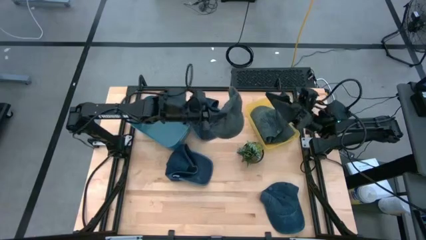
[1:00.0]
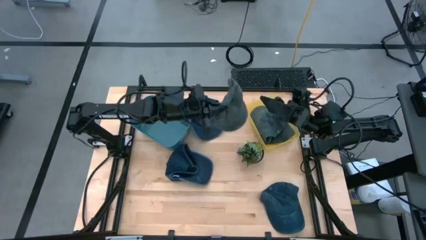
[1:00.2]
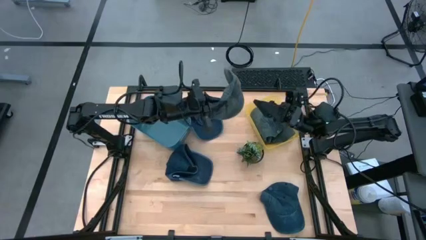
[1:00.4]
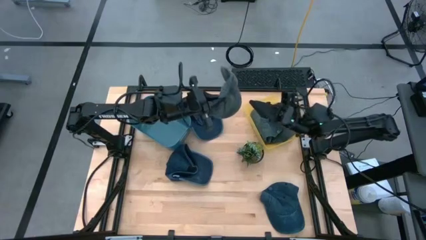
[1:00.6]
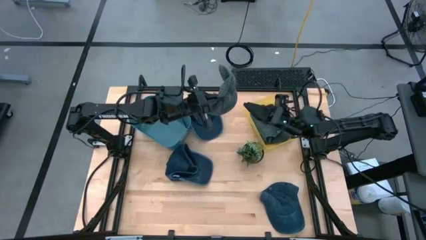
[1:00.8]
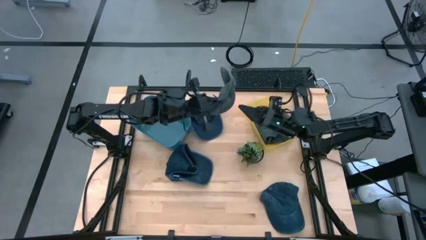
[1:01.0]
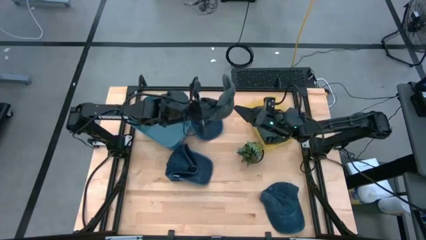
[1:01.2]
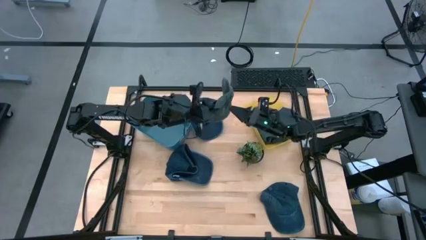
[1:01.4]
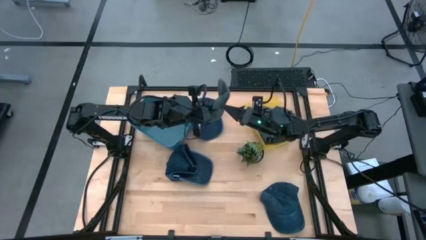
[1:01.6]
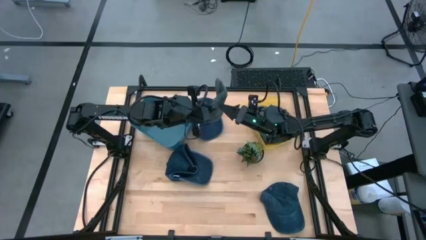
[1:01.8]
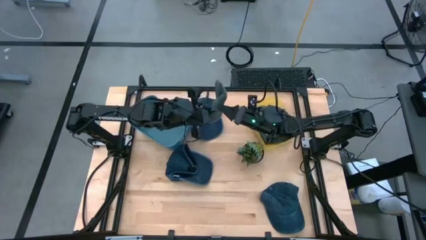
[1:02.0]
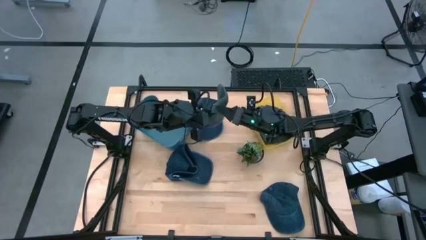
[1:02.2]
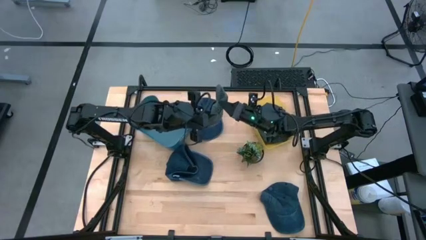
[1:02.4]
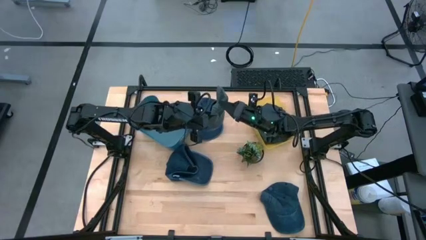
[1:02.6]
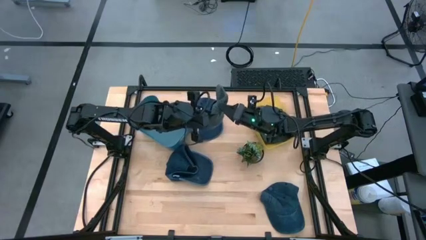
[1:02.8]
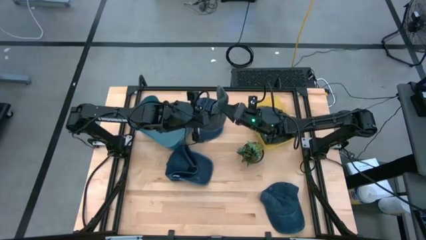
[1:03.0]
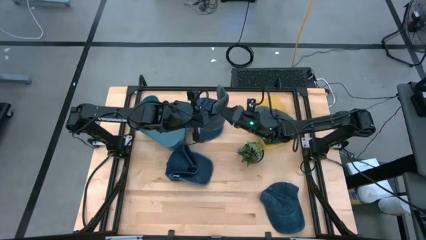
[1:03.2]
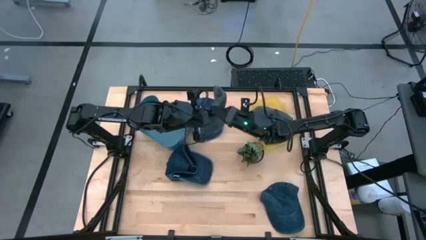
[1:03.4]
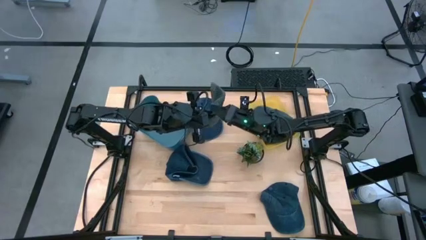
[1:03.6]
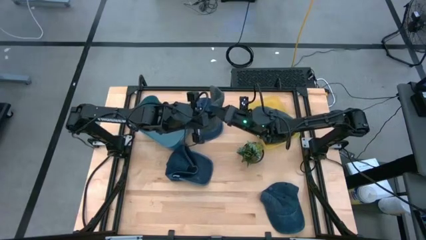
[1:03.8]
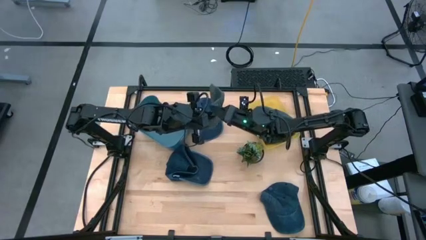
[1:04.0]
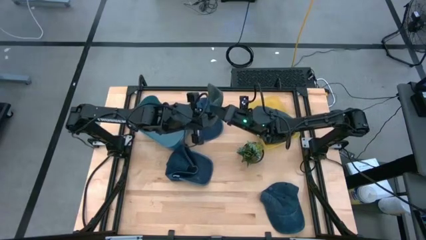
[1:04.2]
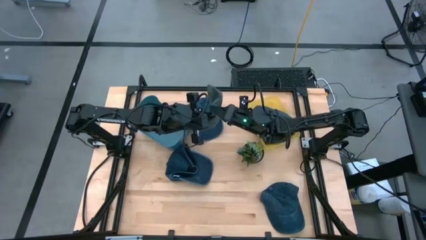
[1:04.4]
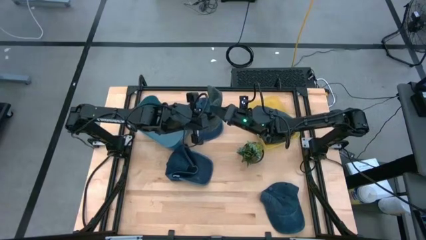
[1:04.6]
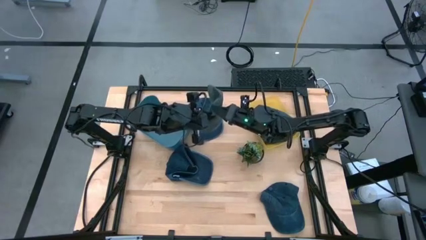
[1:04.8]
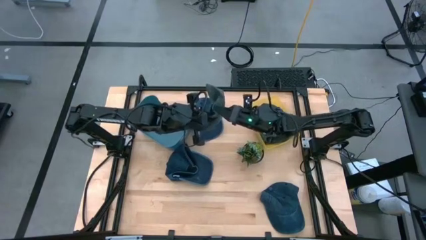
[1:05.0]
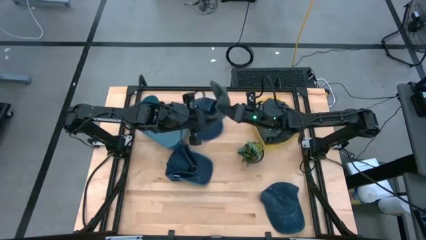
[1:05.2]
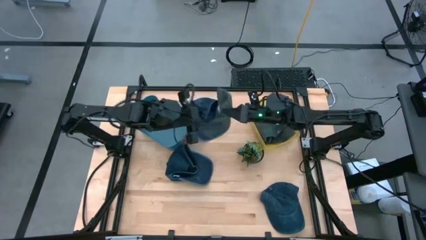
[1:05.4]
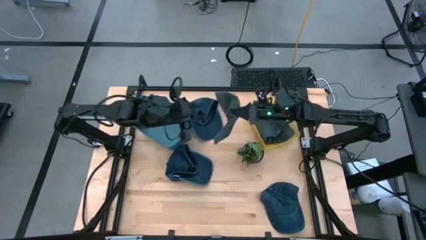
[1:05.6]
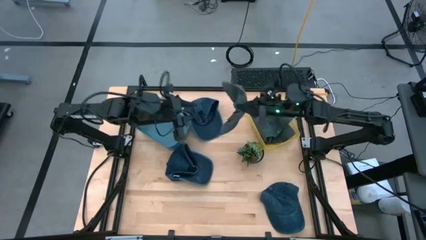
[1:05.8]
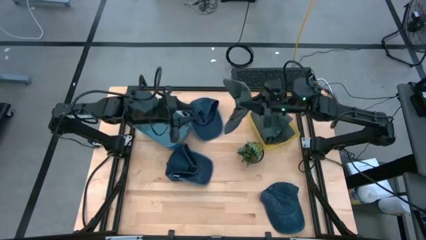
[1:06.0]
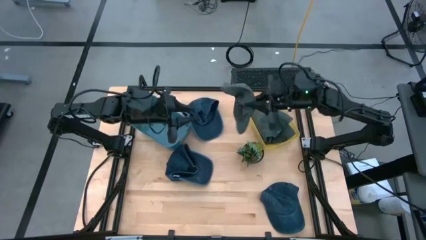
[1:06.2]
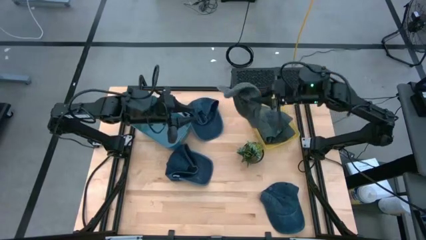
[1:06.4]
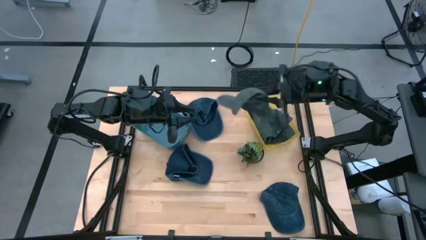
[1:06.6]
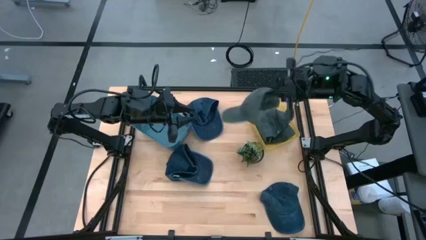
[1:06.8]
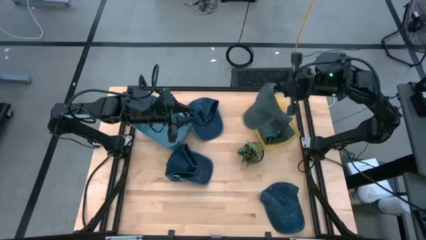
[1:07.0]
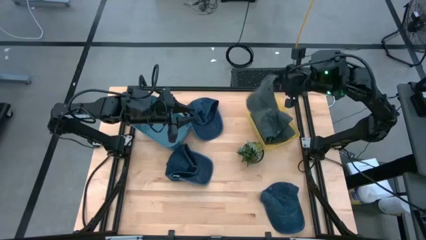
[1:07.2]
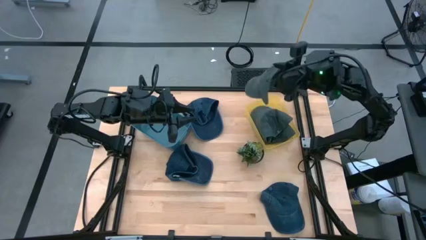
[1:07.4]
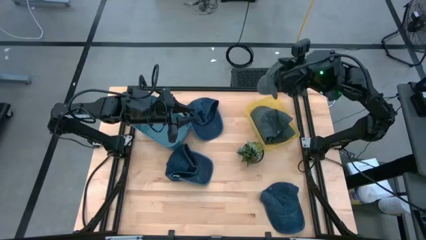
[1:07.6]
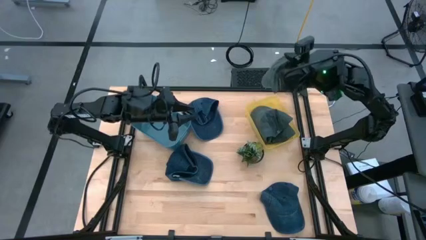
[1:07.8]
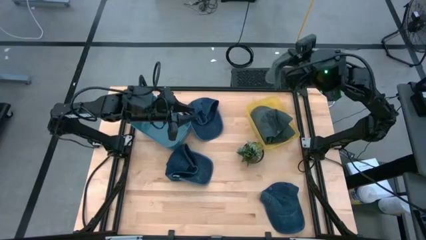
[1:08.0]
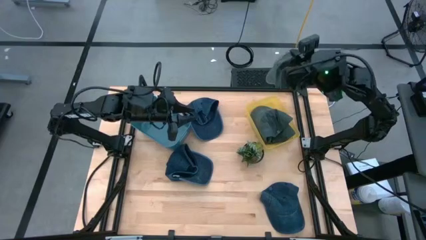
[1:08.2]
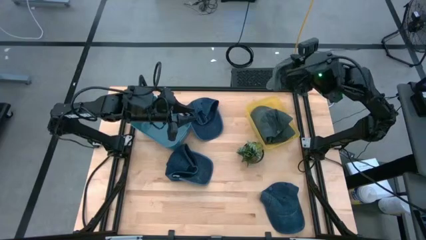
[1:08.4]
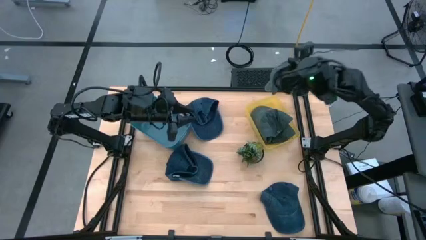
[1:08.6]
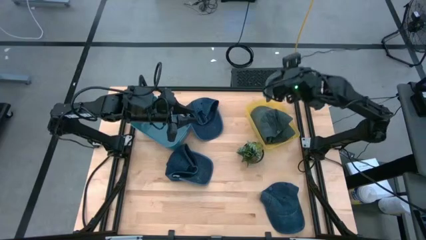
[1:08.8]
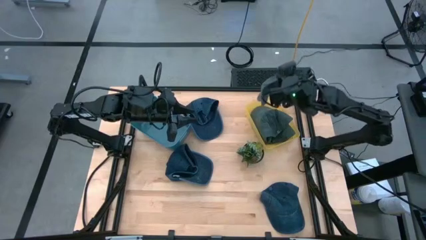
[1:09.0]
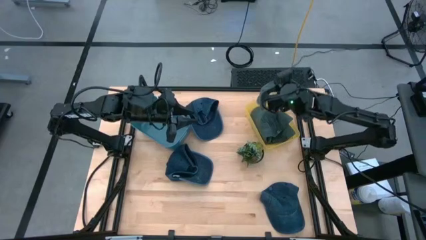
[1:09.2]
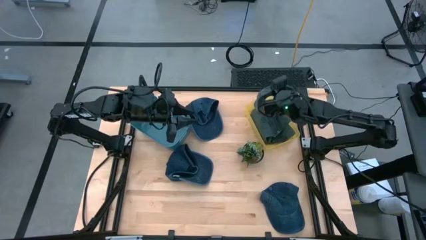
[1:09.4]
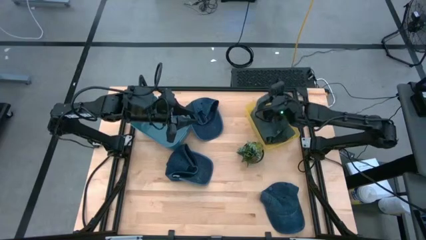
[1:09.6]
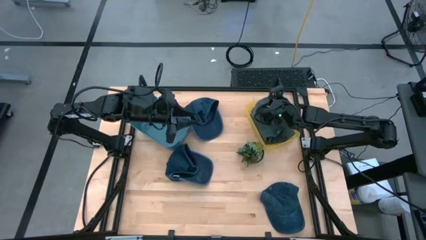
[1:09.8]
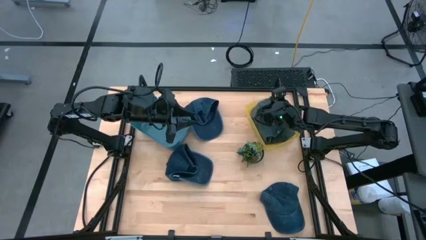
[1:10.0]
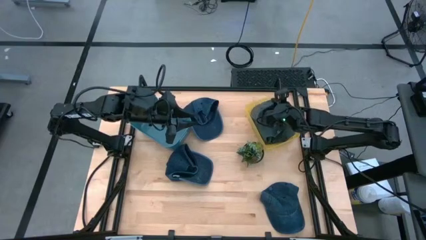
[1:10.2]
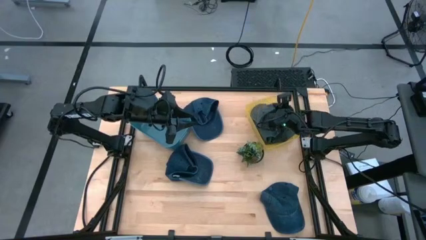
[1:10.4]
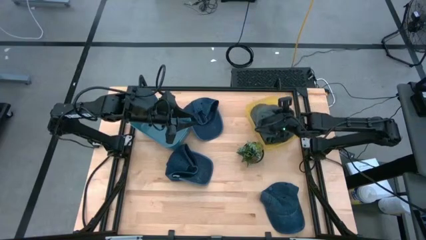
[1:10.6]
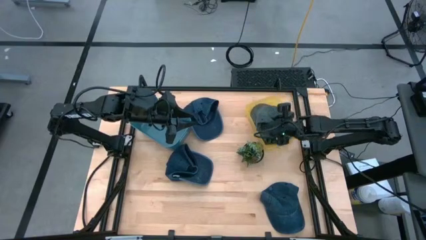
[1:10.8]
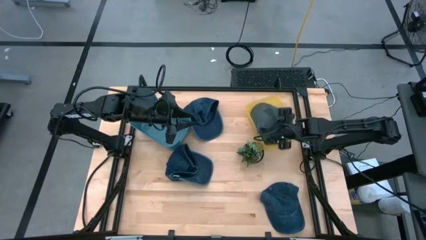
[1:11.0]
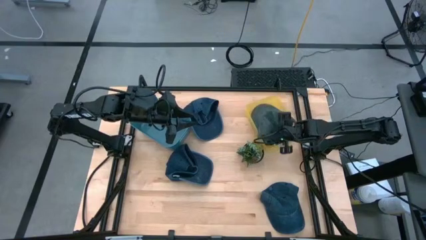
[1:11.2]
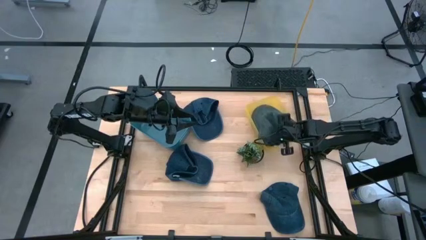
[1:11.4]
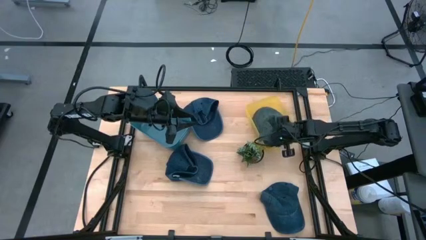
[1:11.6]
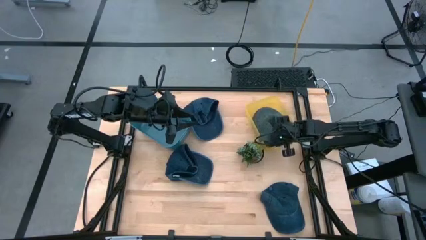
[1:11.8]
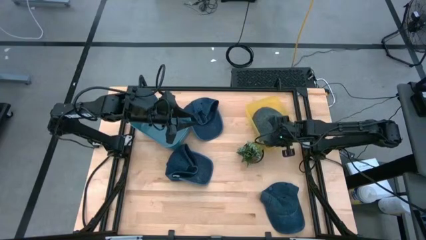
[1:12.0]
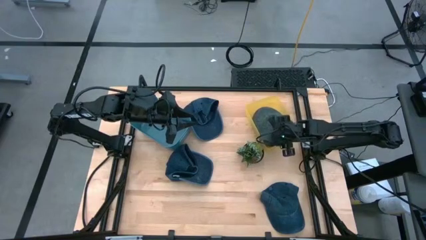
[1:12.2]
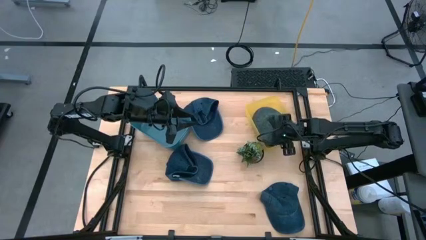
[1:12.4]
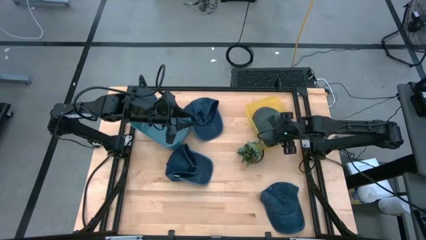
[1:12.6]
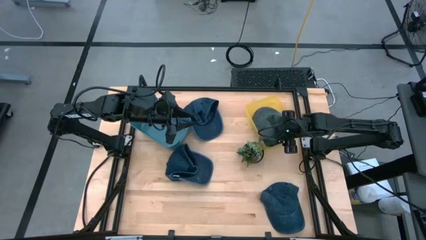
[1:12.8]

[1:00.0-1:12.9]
Task: Pick & Place hat
Put the gray cap into the yellow bin
